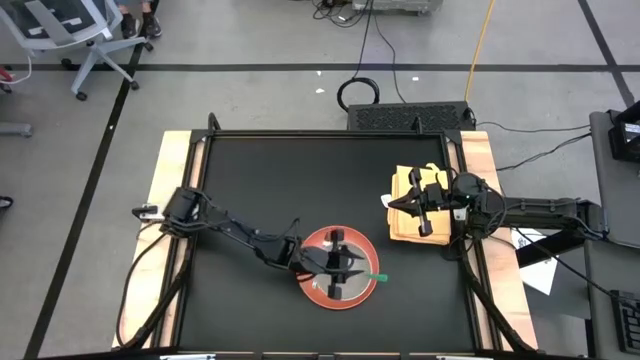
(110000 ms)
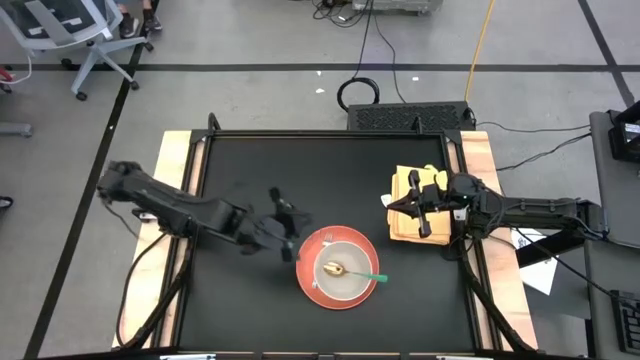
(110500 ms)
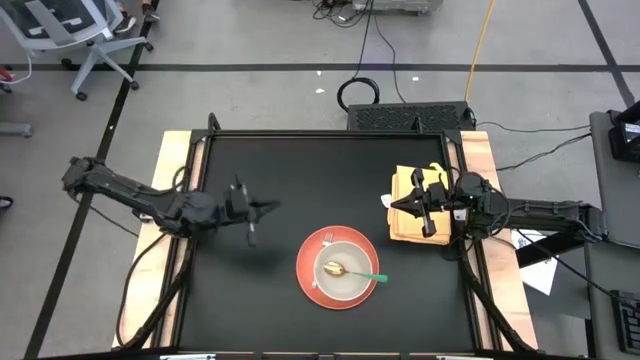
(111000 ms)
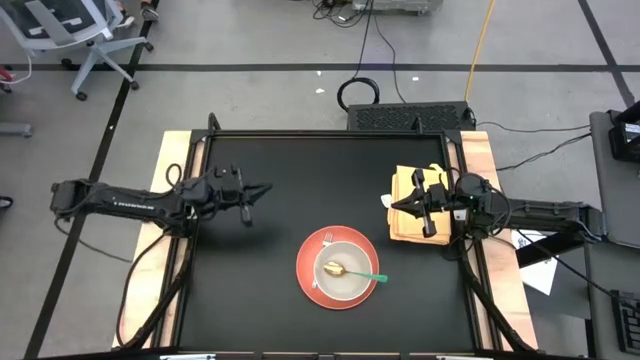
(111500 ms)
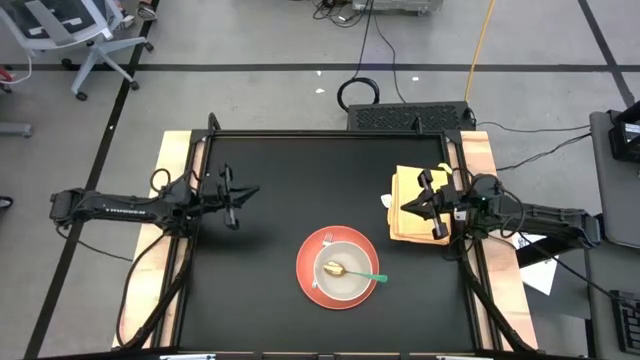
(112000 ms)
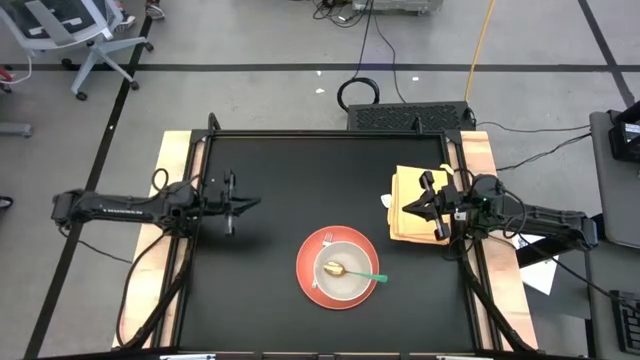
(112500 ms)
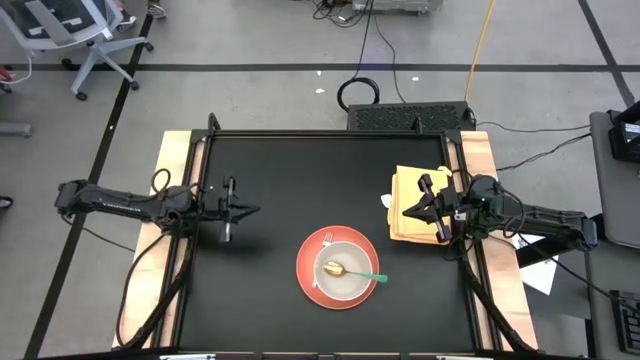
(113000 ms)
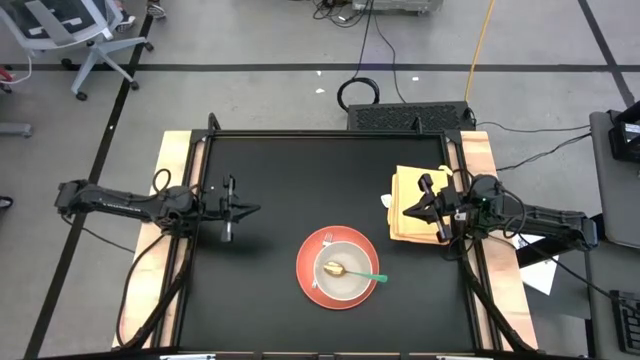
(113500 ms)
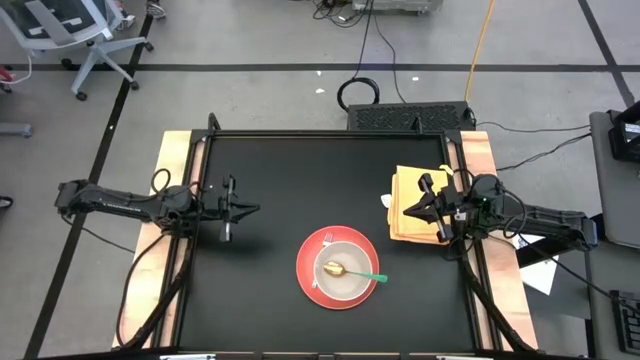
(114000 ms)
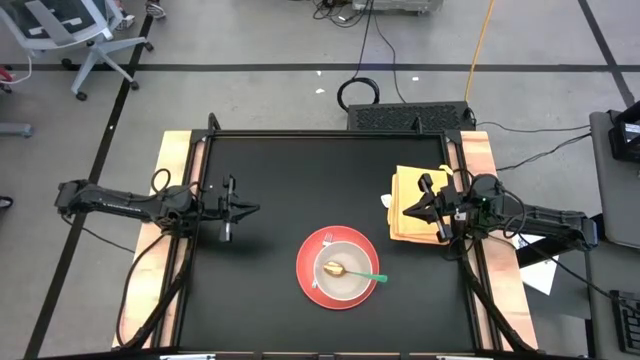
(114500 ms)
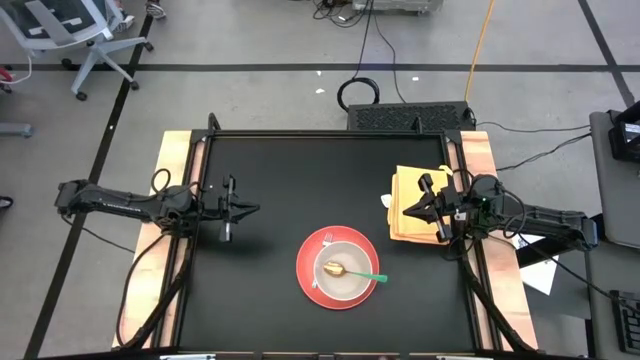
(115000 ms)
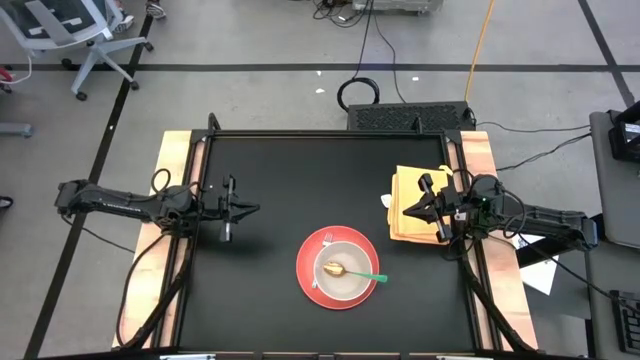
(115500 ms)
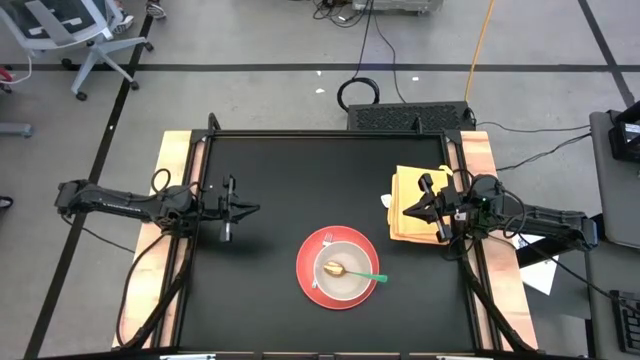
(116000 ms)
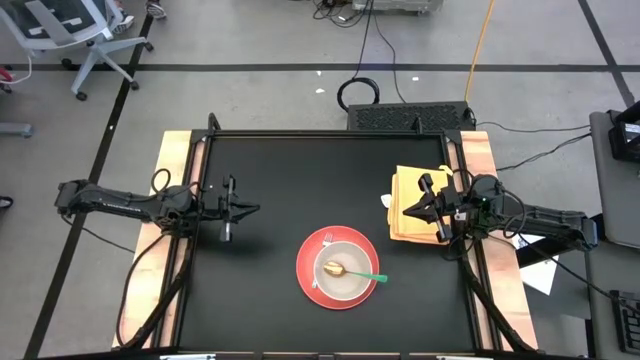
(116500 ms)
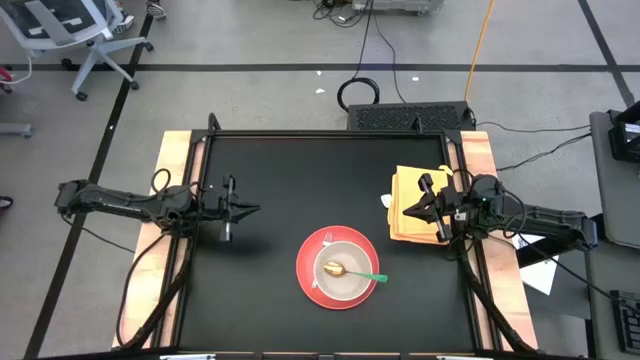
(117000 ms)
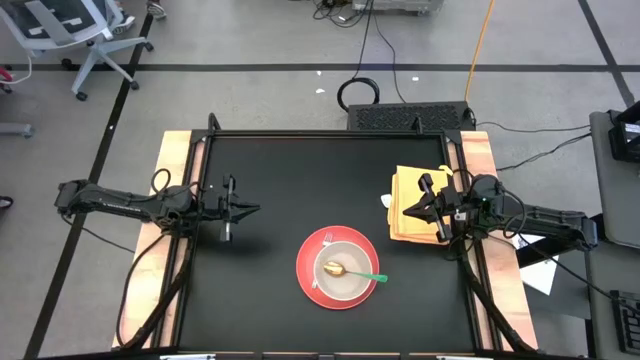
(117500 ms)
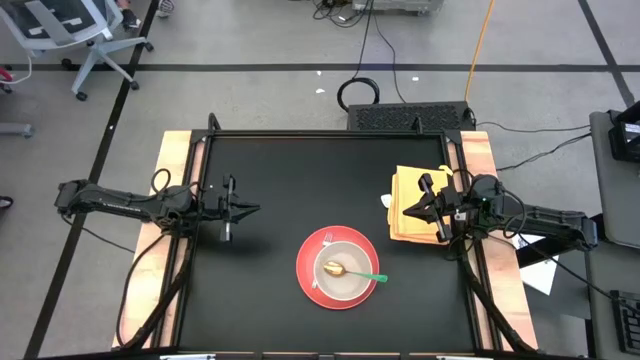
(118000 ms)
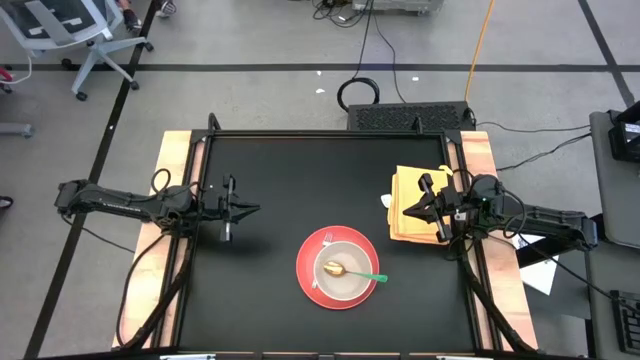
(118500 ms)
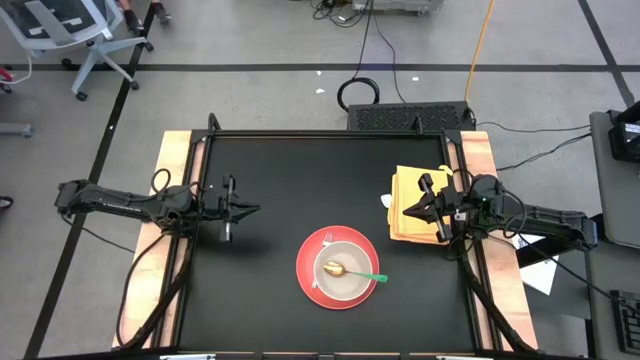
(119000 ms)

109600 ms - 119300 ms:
Task: Set table place
Return to Home Position

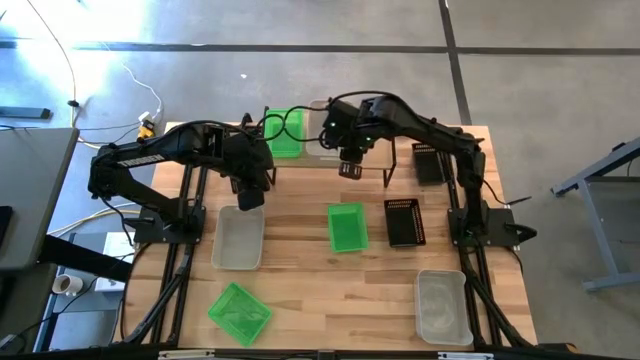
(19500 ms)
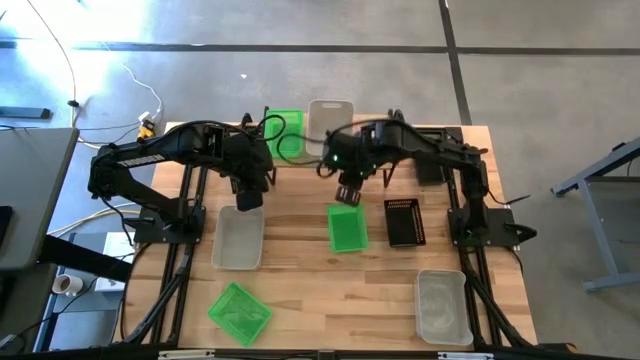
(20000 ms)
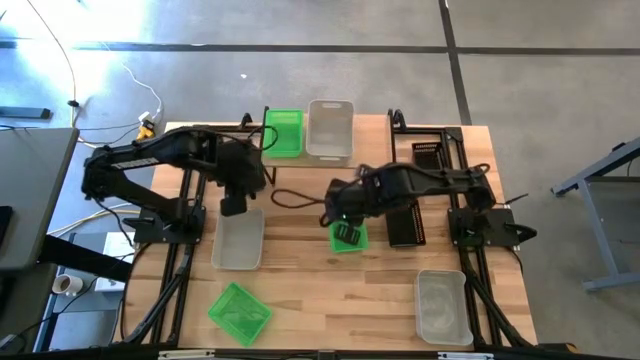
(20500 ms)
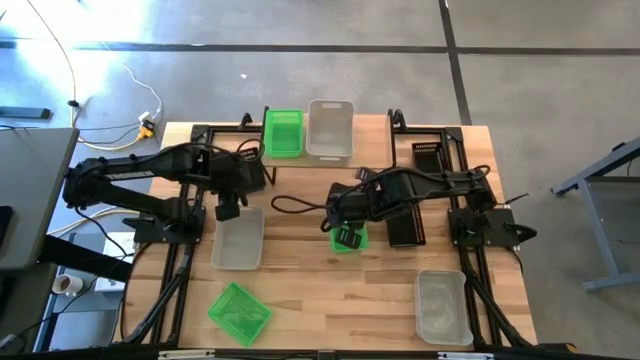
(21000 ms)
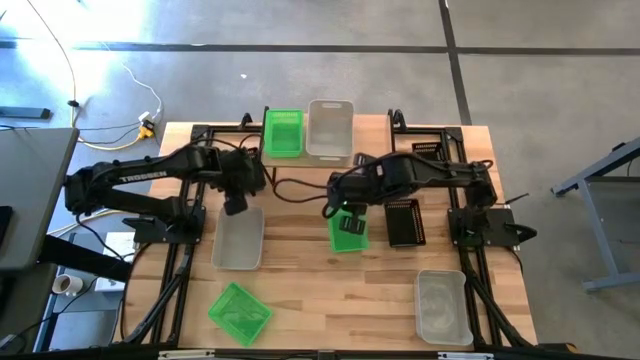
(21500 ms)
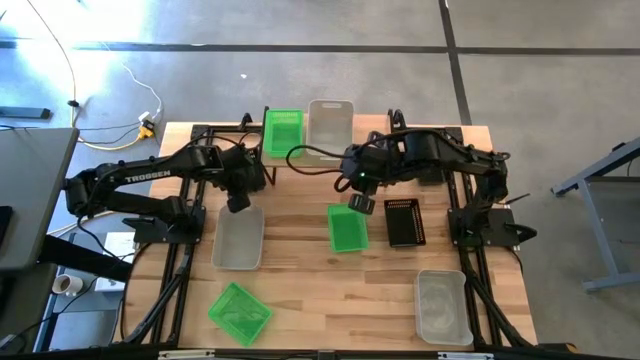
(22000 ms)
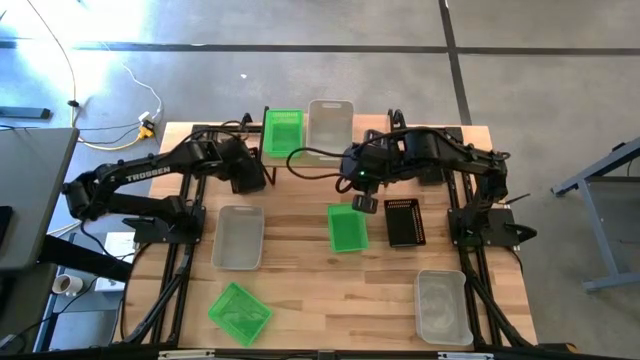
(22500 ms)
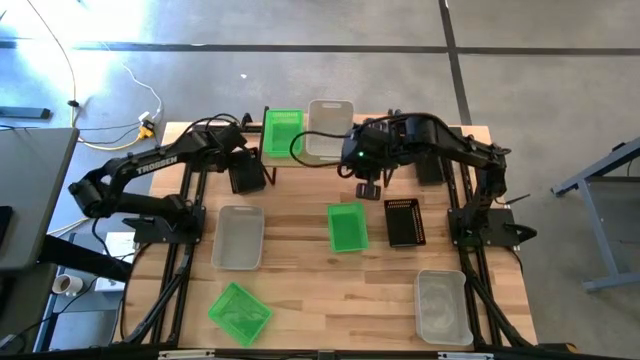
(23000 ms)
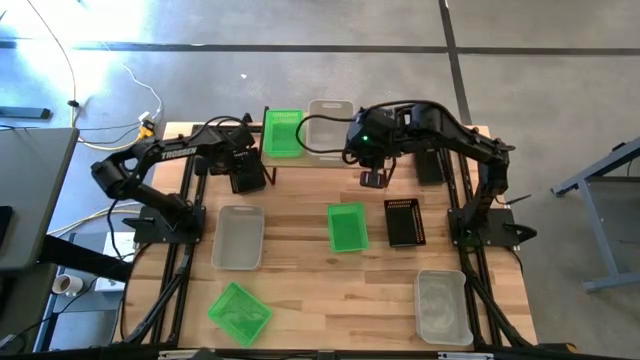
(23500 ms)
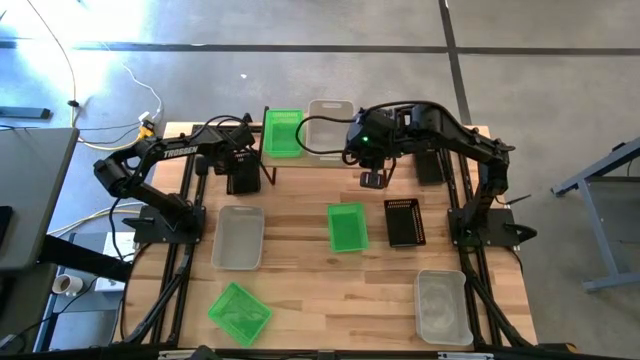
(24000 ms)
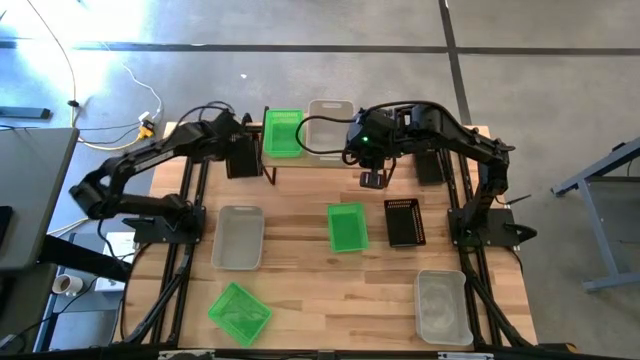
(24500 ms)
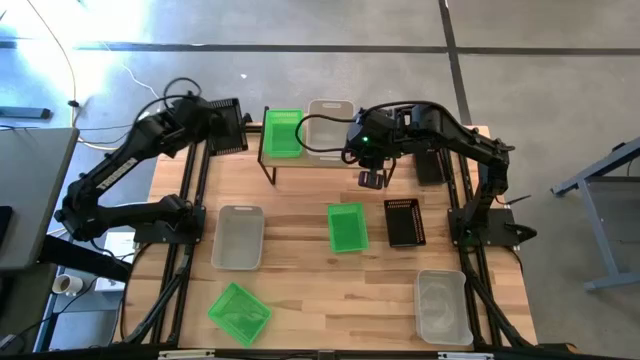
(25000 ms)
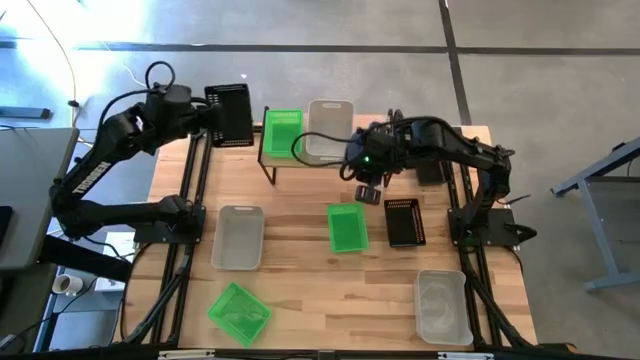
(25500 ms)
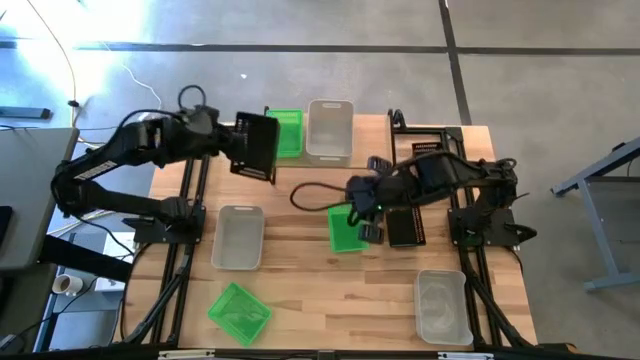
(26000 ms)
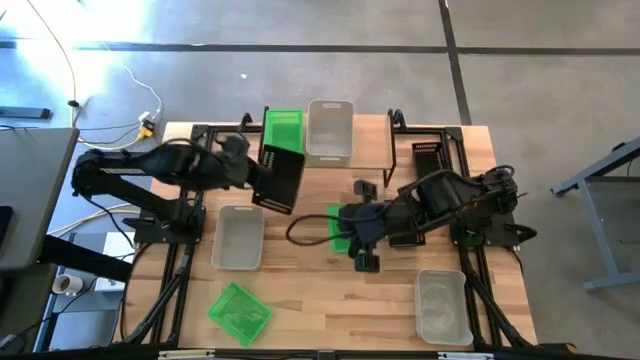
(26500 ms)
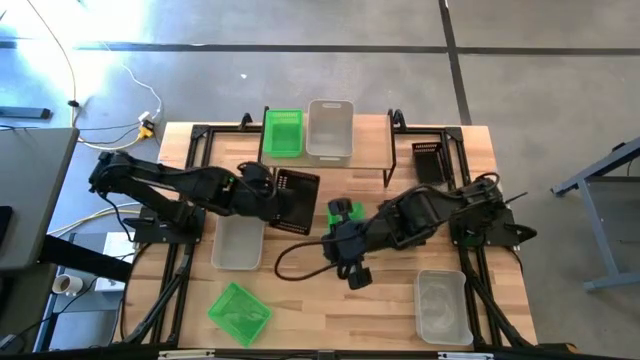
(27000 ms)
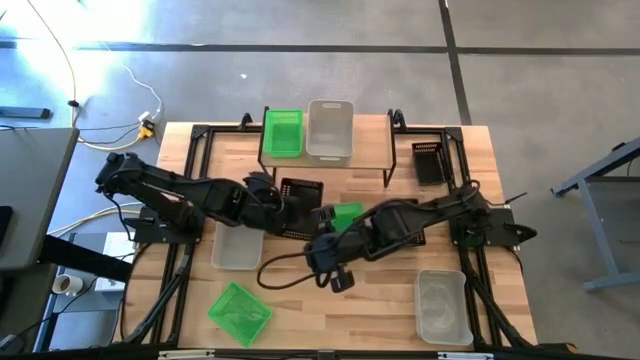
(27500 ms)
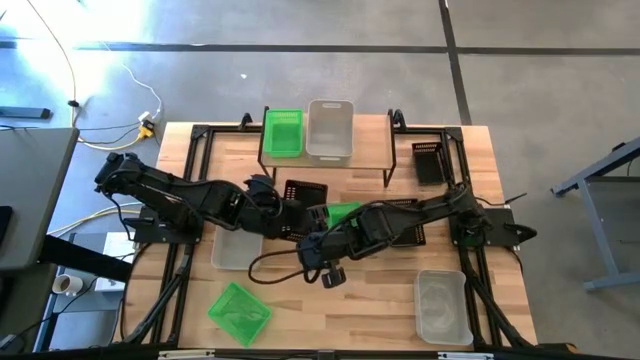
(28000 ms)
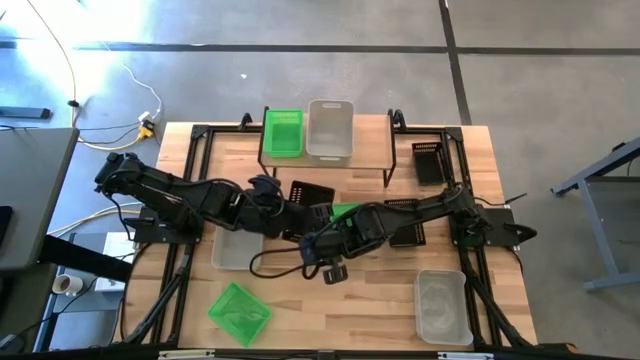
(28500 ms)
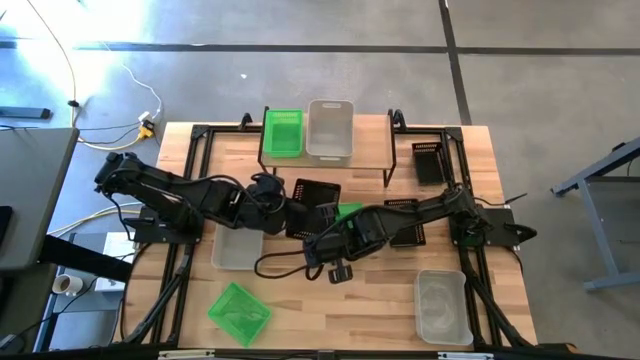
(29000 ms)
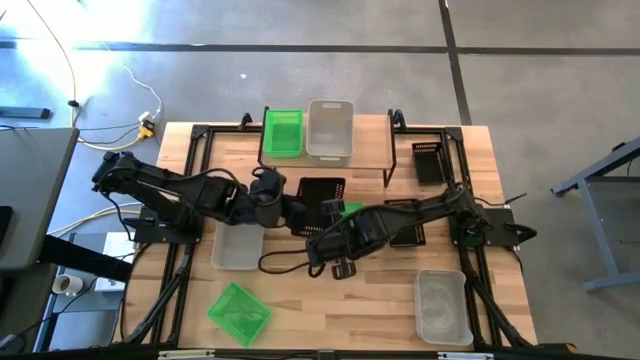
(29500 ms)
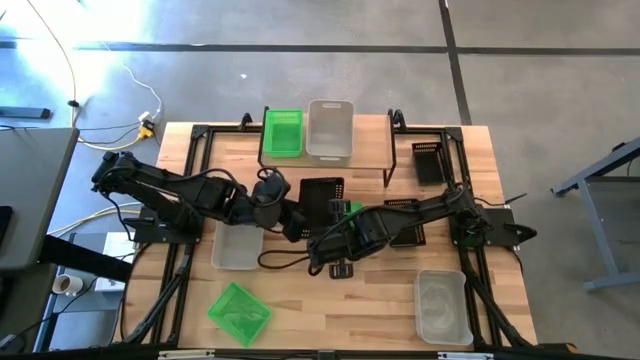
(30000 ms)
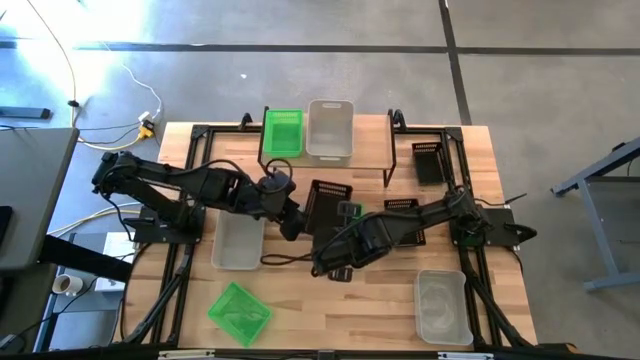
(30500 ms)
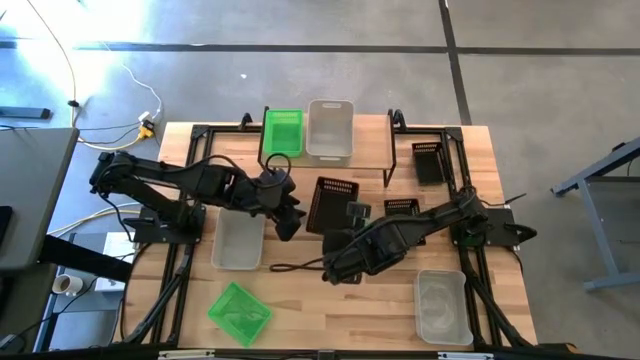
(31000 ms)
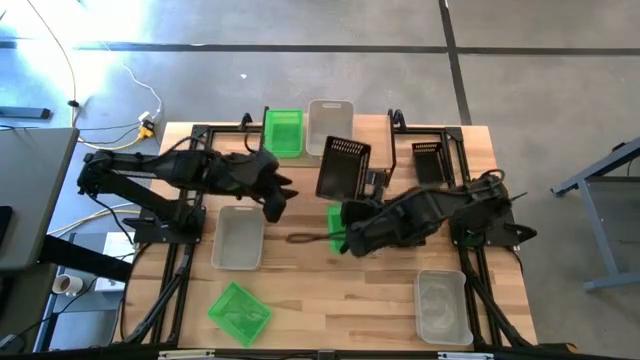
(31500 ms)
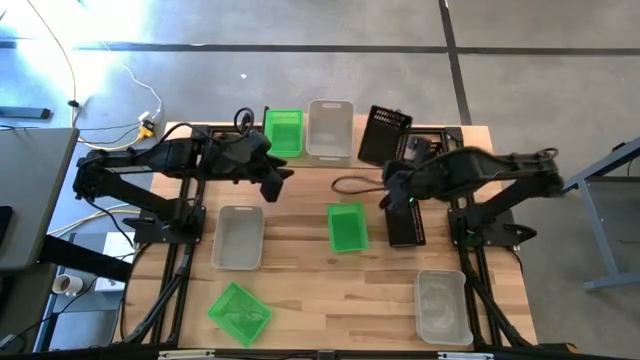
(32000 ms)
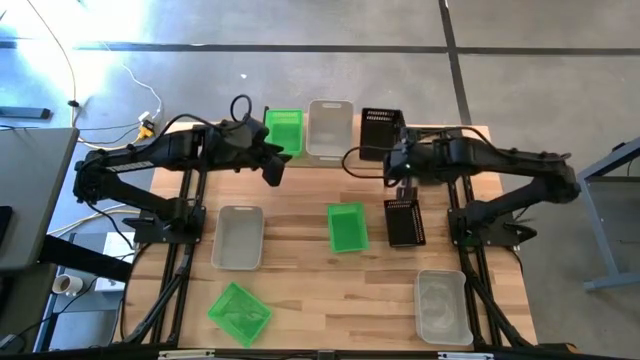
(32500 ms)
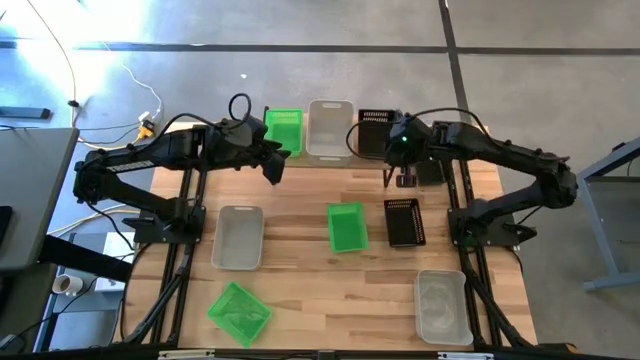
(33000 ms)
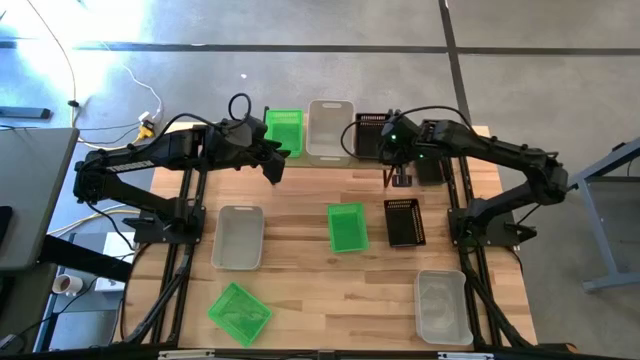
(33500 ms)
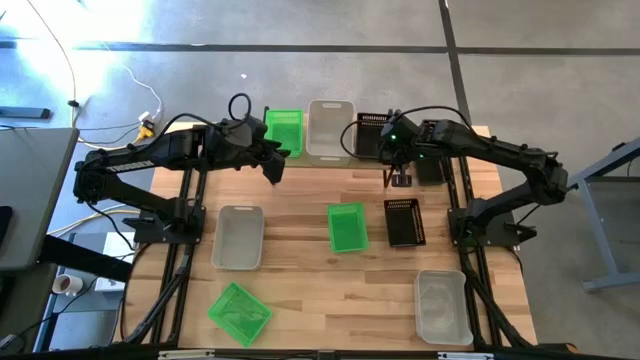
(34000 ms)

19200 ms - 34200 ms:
Task: Stack baskets on shelf by color
Put the left black bin on the shelf
